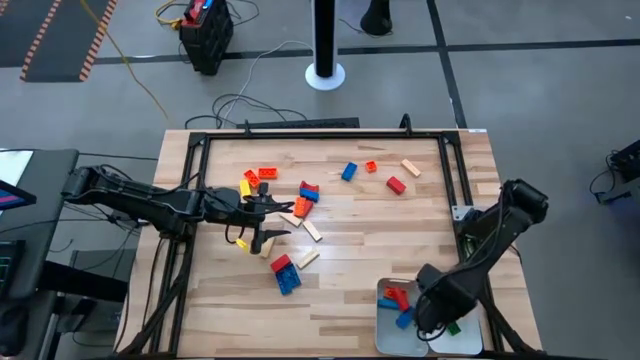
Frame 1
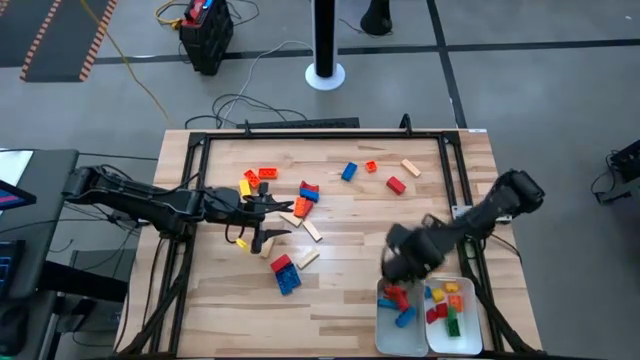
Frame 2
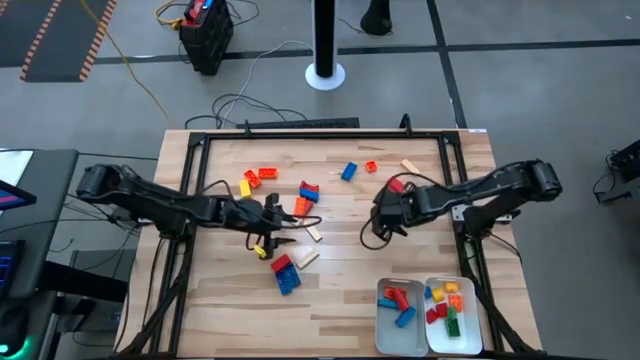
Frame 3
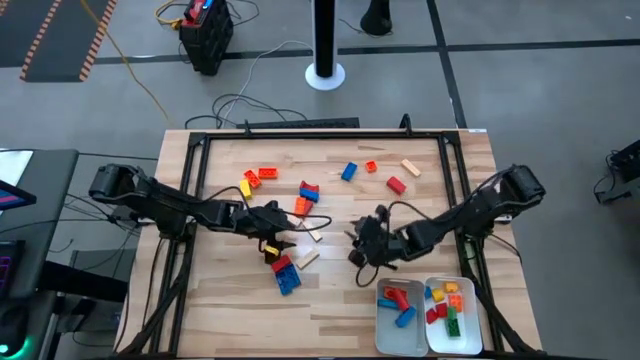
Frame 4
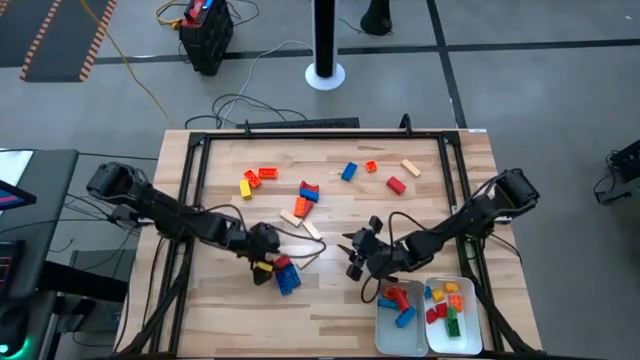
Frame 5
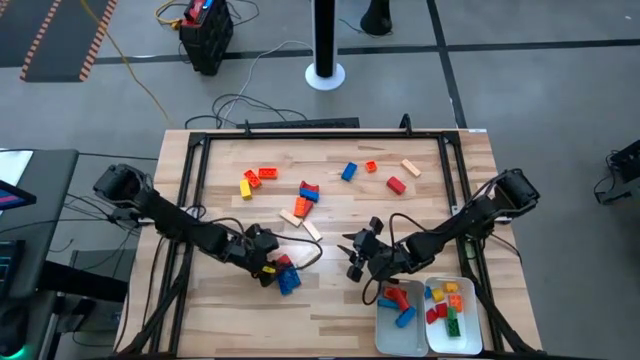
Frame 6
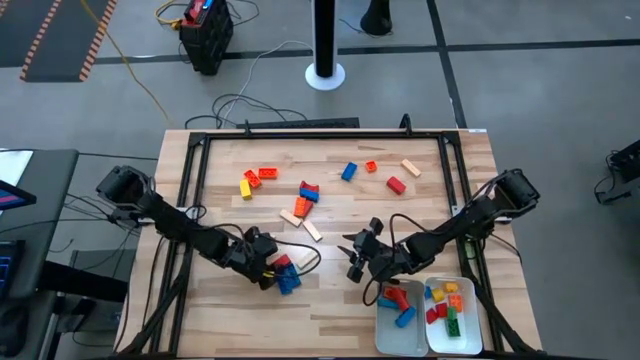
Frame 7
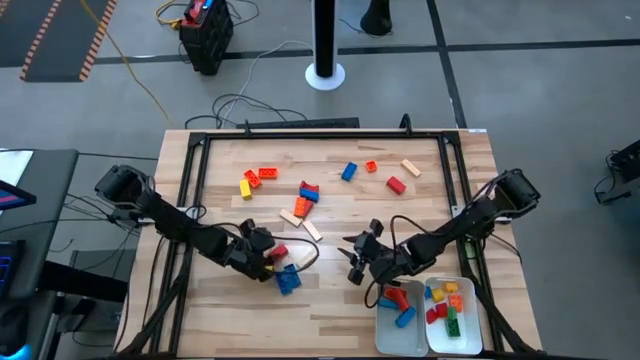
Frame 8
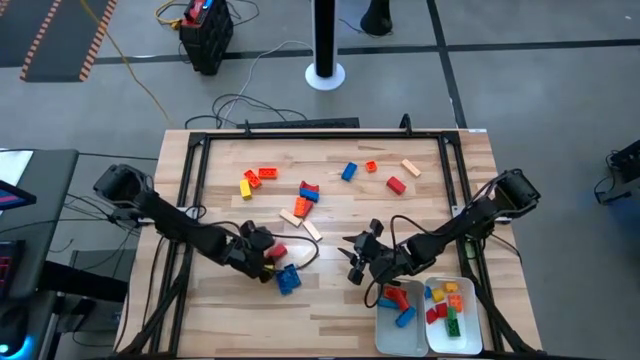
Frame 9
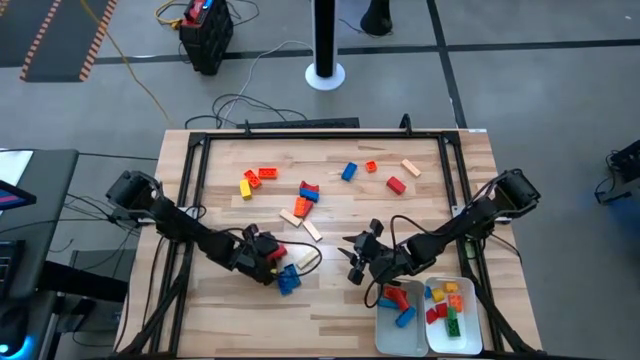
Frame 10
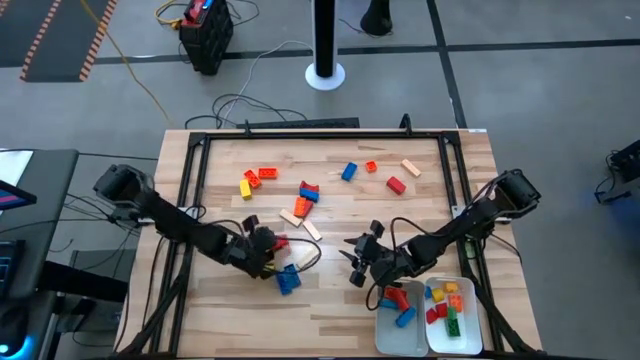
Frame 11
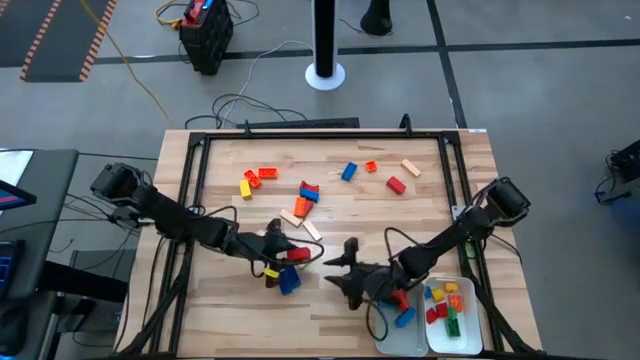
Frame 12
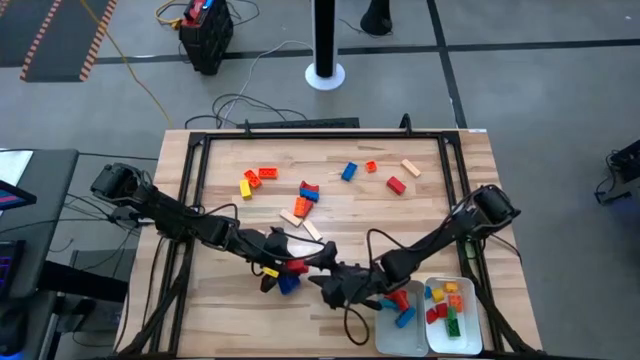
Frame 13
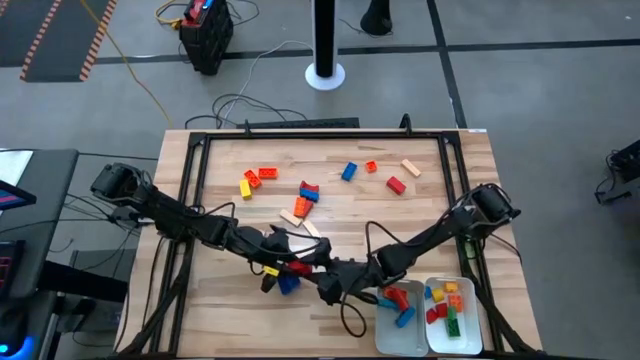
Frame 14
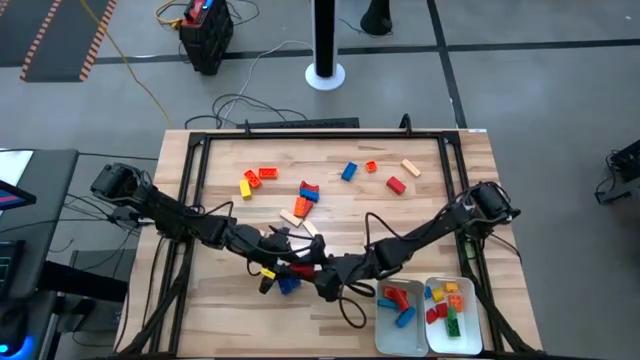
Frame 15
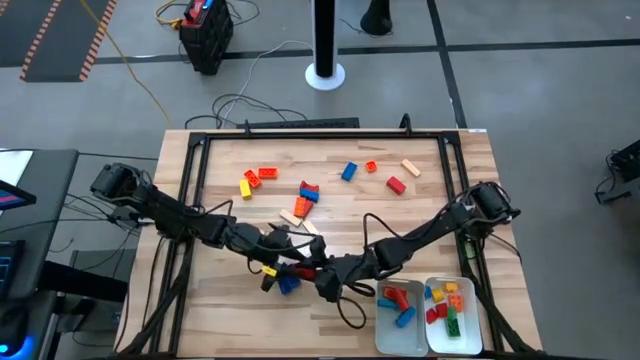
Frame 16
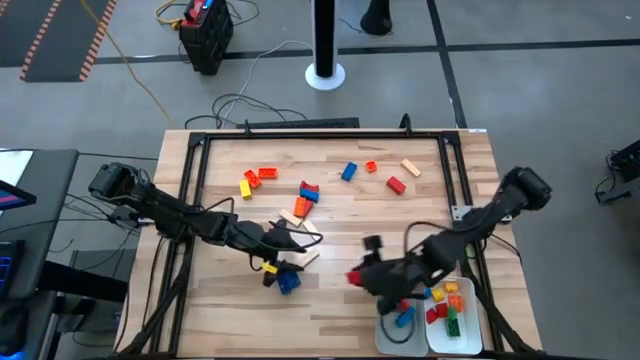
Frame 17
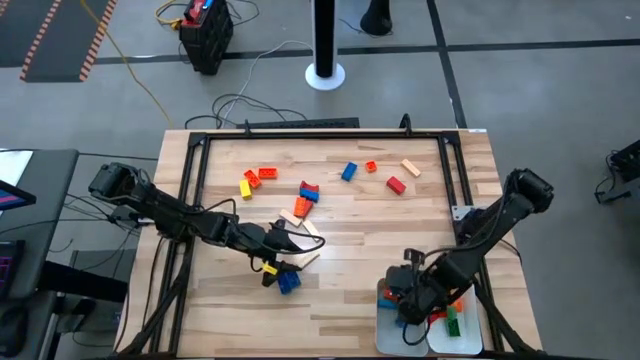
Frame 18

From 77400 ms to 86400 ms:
Task: Sort blocks by size
Put the large red wooden block into the gray bin

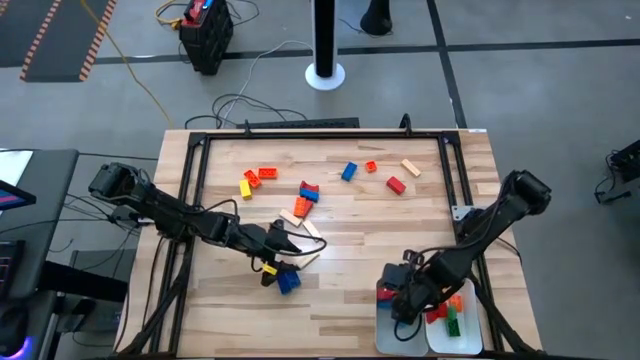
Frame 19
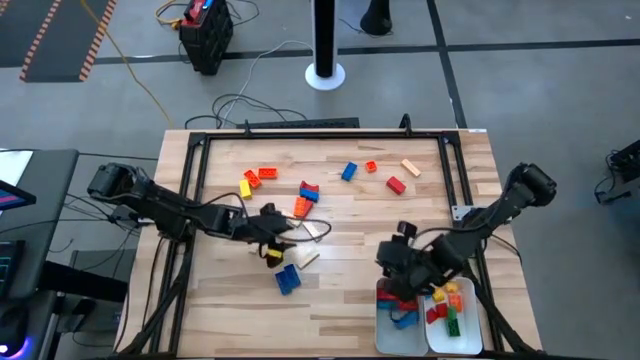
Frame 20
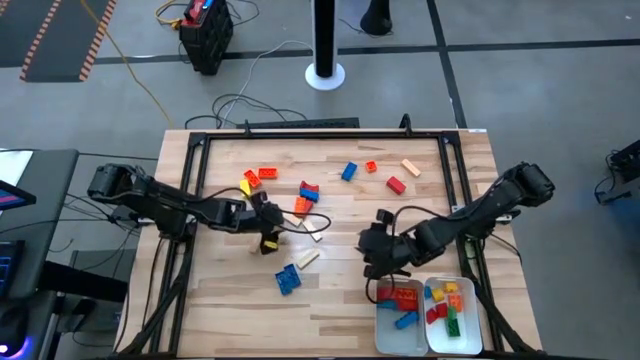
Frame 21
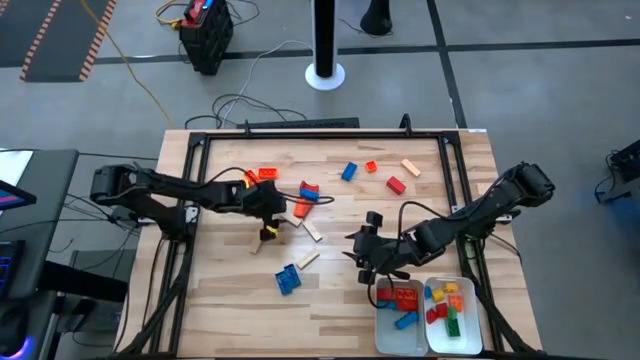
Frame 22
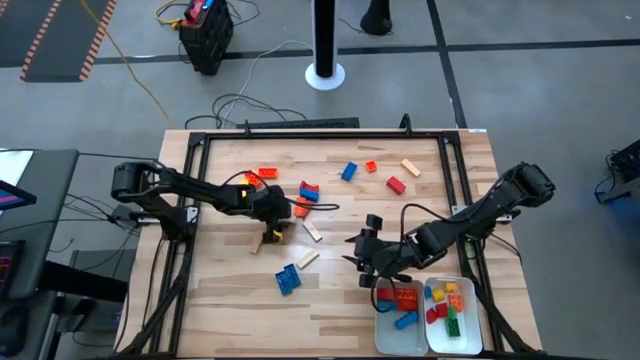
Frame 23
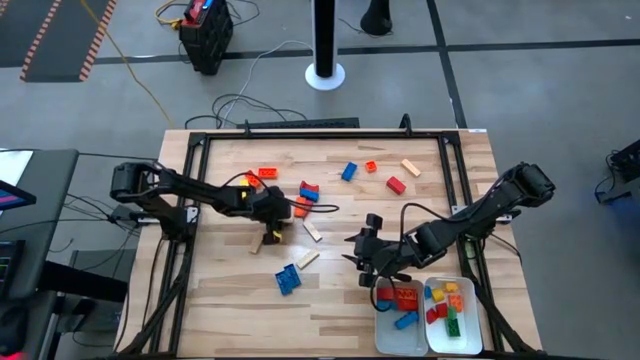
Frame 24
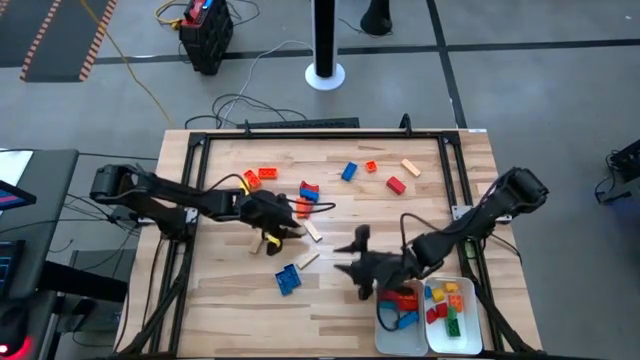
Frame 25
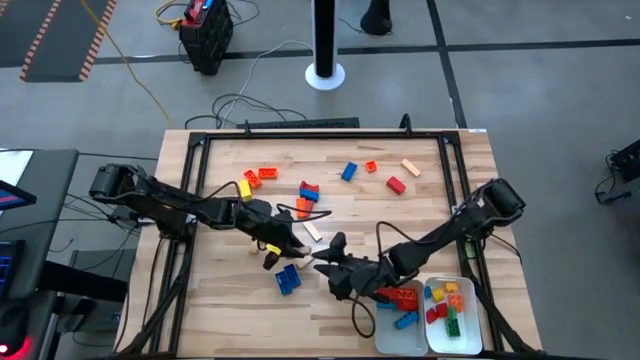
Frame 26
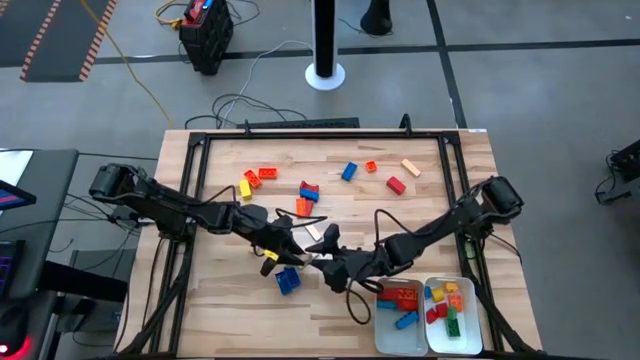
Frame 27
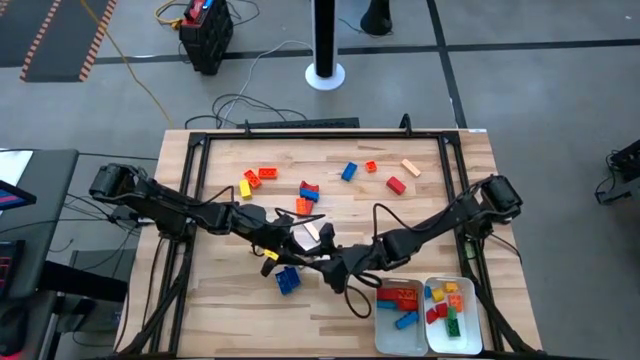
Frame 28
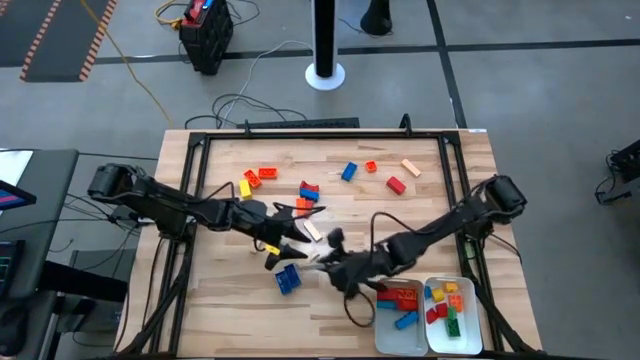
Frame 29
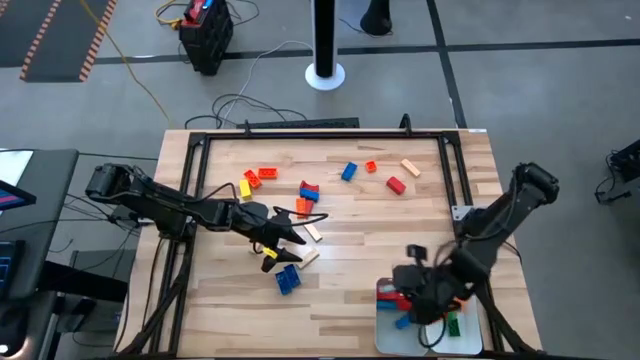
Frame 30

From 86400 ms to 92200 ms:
Put the large light brown wooden block into the gray bin

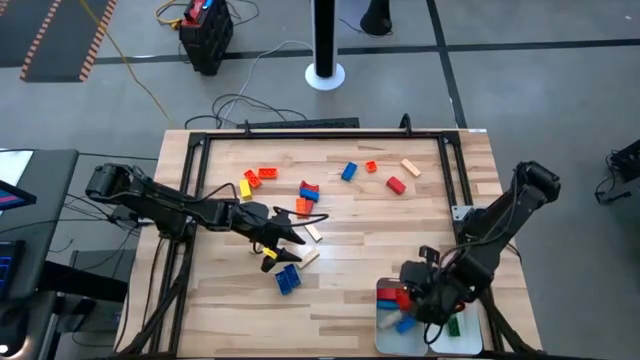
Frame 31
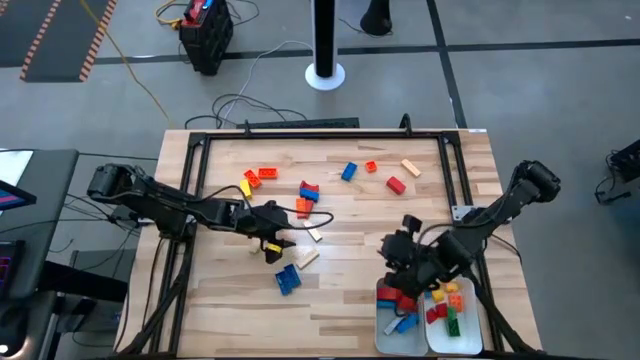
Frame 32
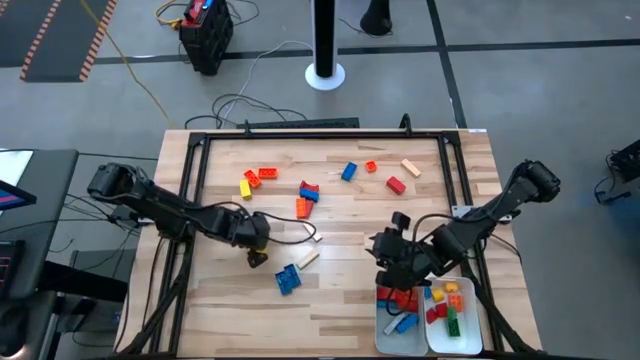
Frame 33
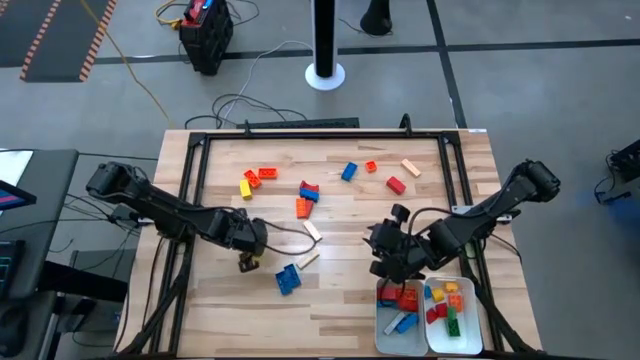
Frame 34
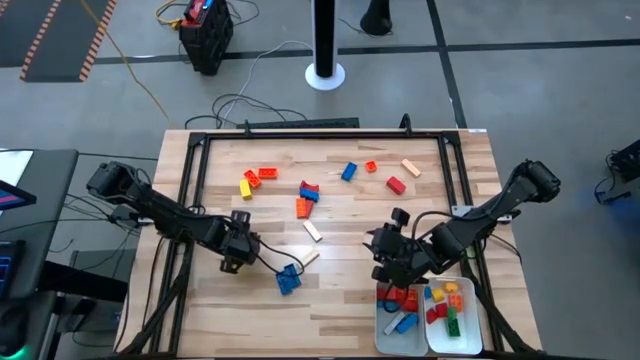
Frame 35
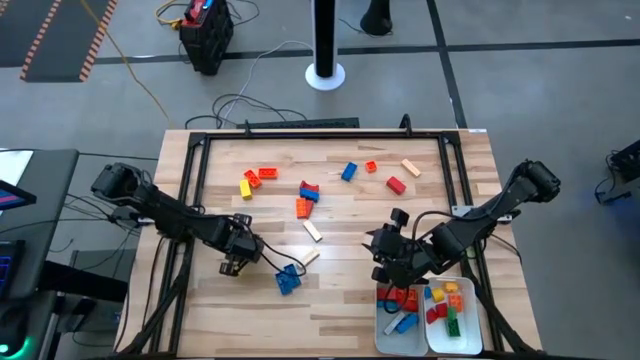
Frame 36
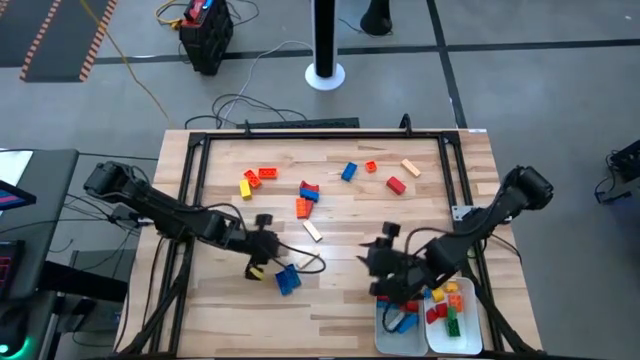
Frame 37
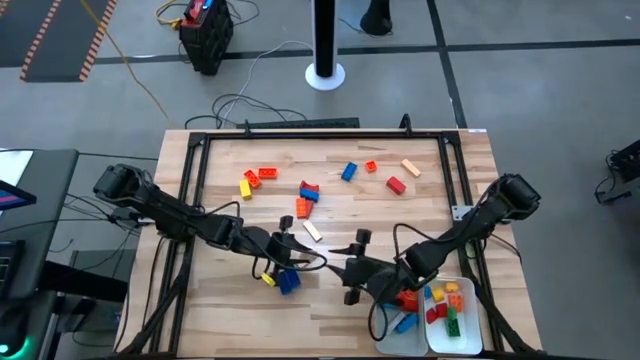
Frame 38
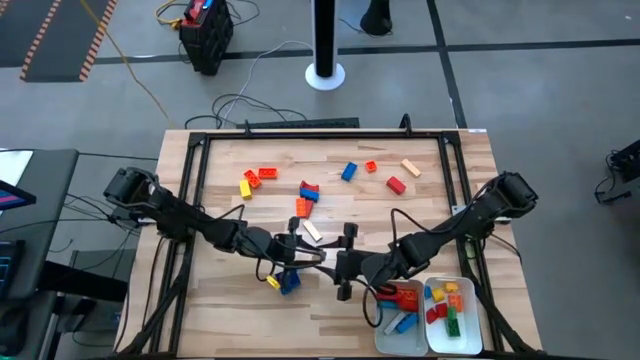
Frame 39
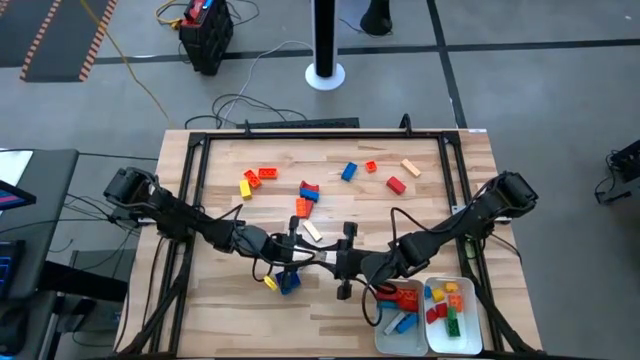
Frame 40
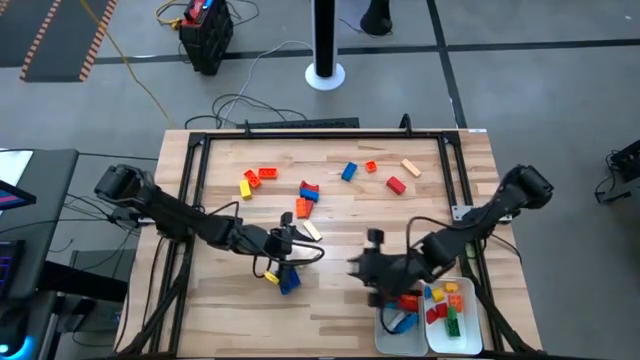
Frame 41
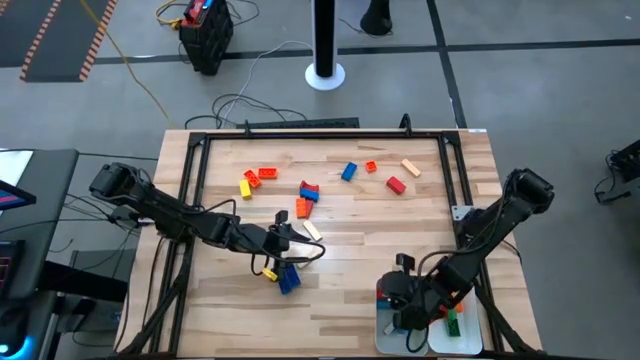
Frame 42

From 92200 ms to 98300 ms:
Put the large light brown wooden block into the gray bin
